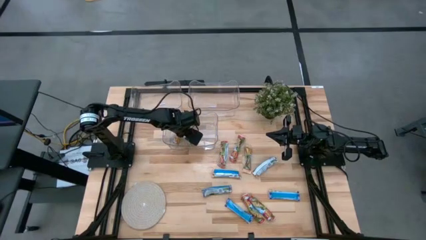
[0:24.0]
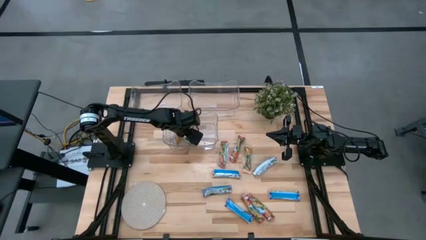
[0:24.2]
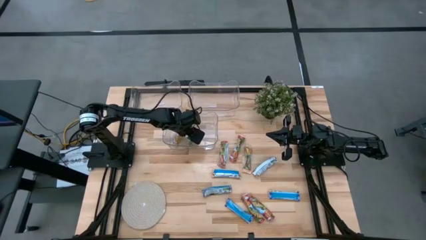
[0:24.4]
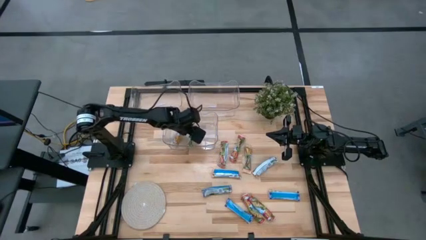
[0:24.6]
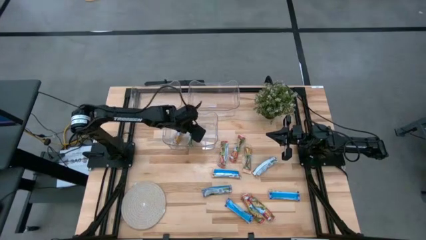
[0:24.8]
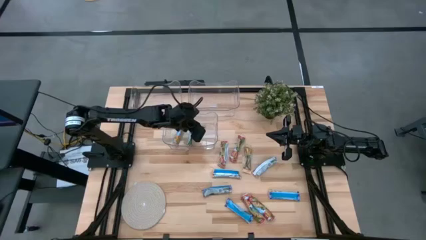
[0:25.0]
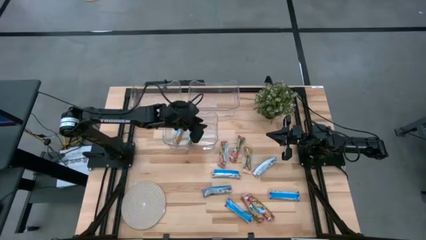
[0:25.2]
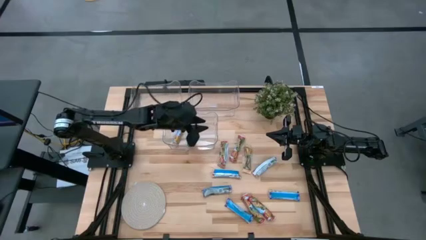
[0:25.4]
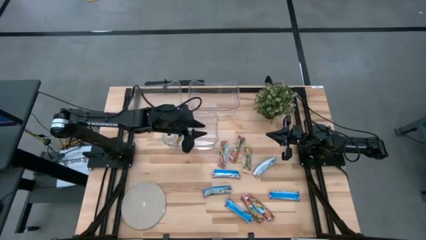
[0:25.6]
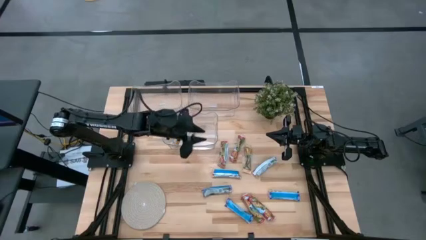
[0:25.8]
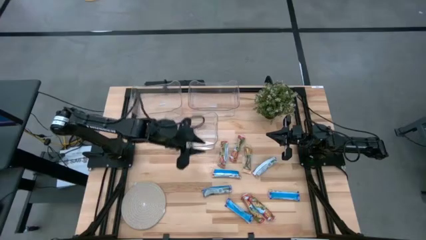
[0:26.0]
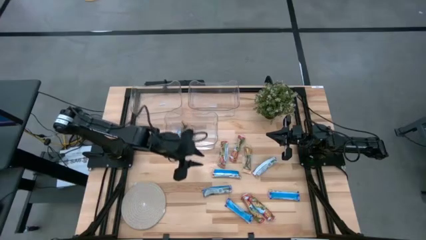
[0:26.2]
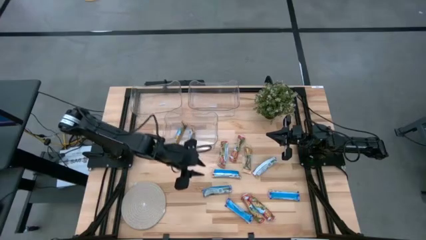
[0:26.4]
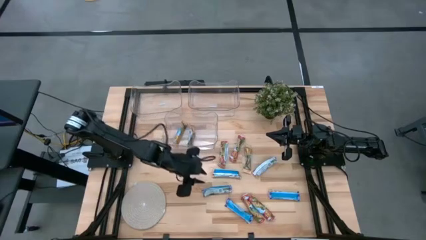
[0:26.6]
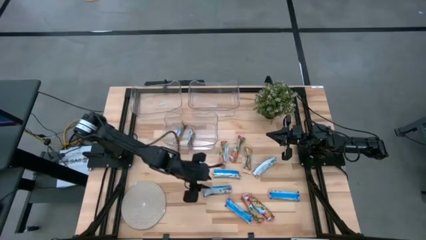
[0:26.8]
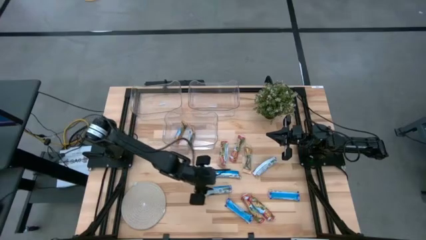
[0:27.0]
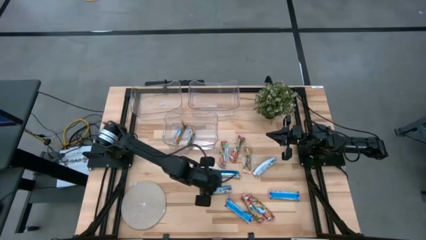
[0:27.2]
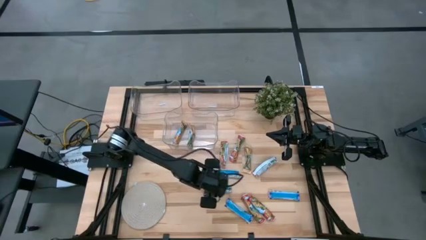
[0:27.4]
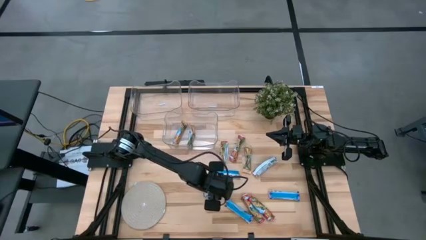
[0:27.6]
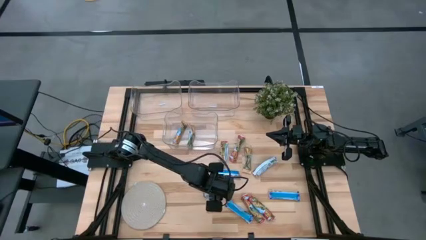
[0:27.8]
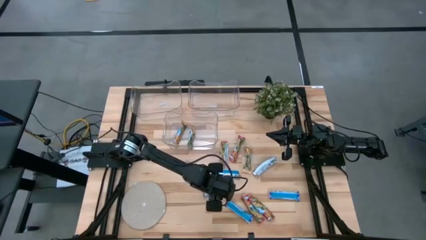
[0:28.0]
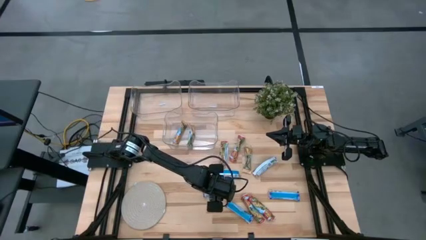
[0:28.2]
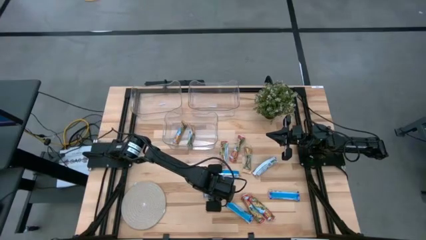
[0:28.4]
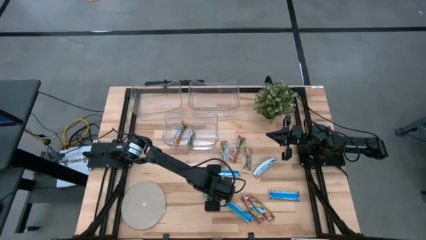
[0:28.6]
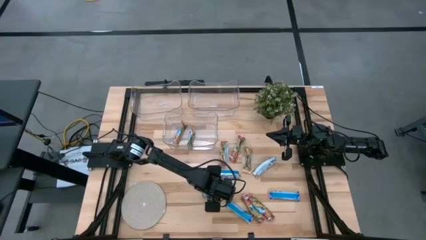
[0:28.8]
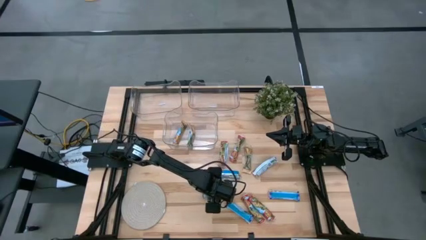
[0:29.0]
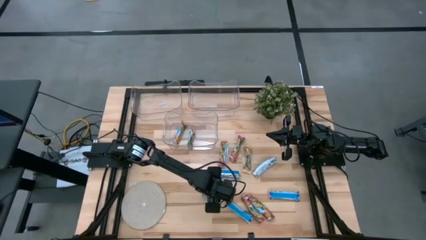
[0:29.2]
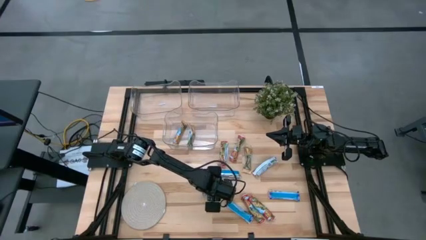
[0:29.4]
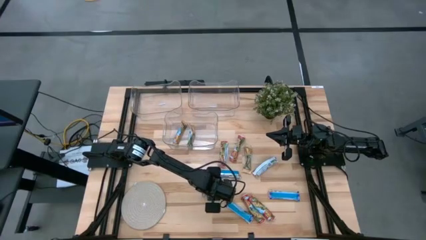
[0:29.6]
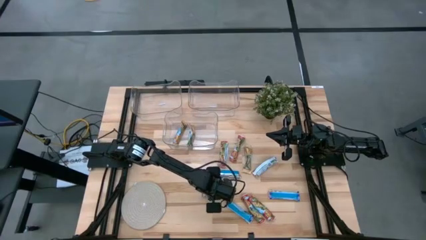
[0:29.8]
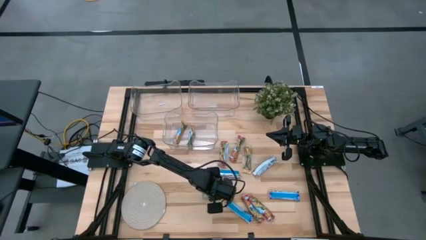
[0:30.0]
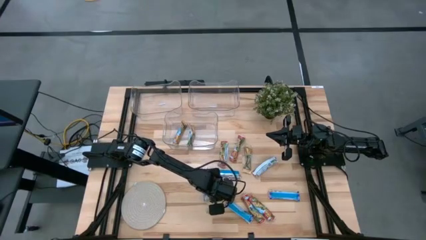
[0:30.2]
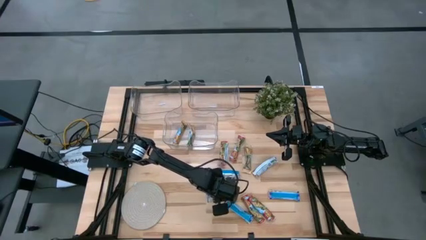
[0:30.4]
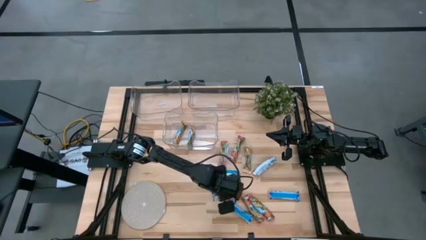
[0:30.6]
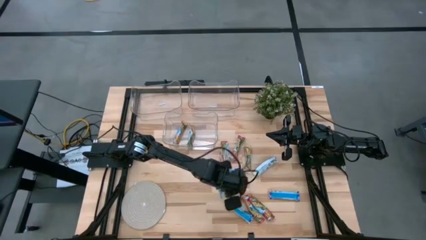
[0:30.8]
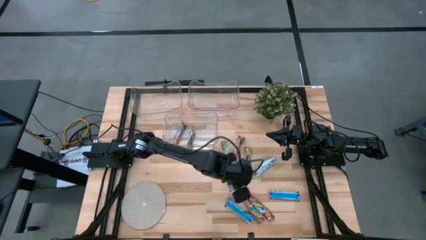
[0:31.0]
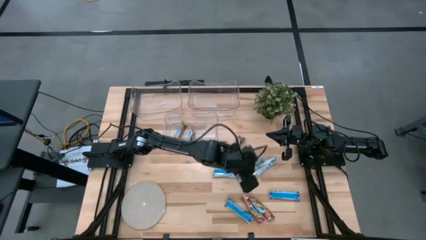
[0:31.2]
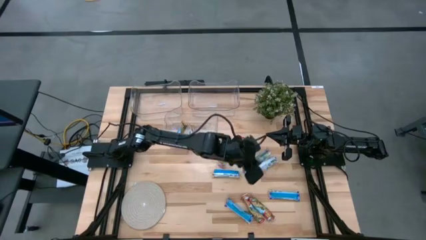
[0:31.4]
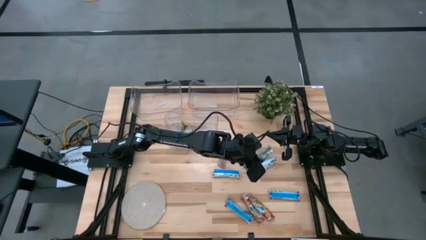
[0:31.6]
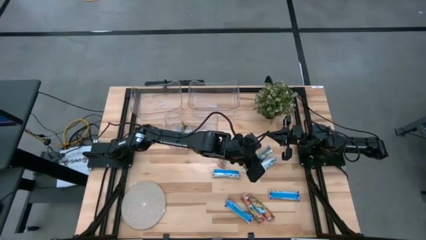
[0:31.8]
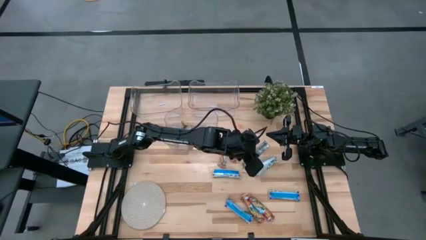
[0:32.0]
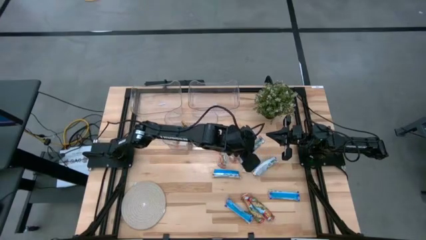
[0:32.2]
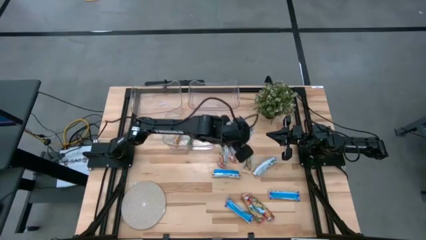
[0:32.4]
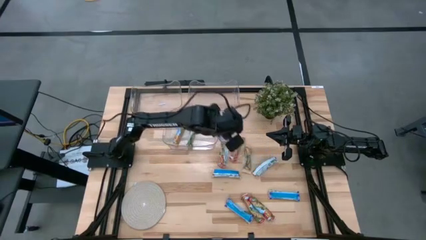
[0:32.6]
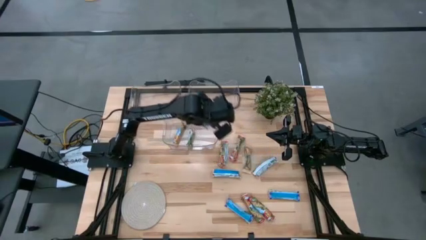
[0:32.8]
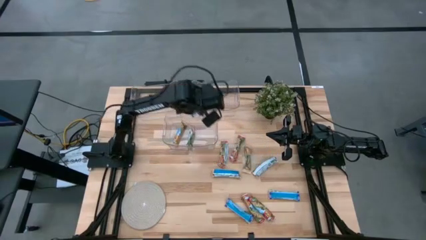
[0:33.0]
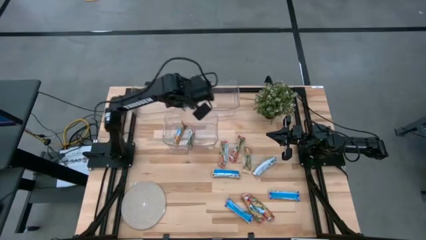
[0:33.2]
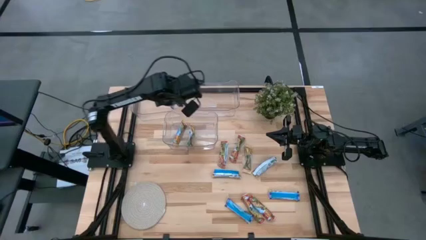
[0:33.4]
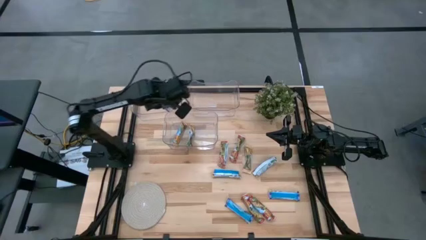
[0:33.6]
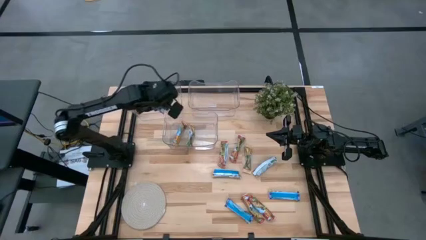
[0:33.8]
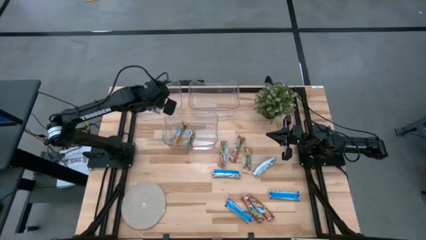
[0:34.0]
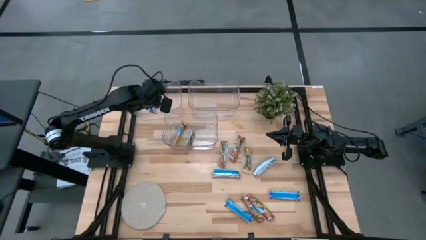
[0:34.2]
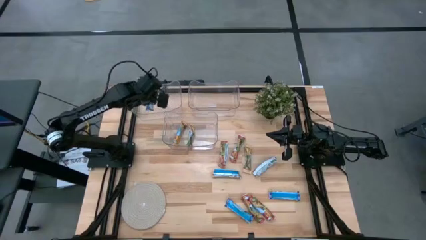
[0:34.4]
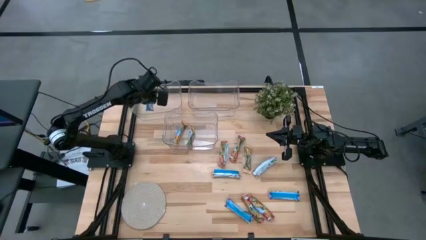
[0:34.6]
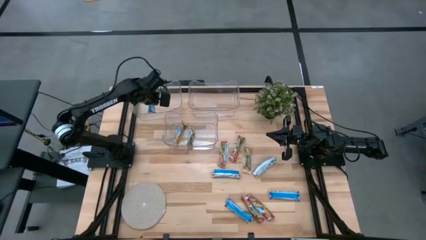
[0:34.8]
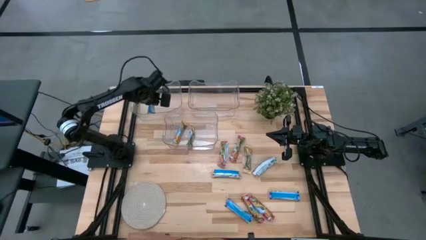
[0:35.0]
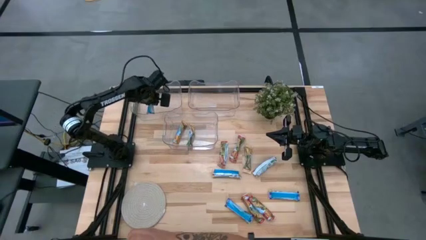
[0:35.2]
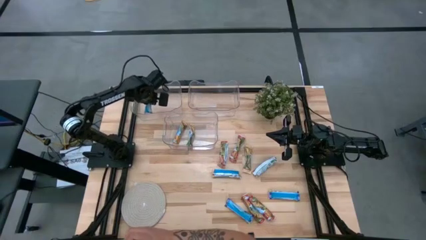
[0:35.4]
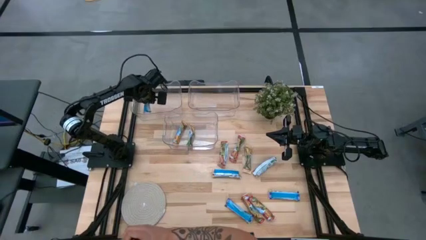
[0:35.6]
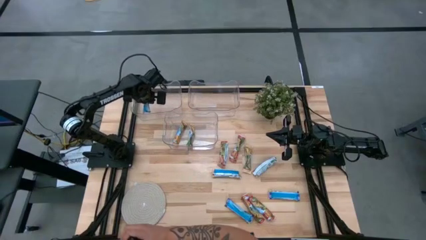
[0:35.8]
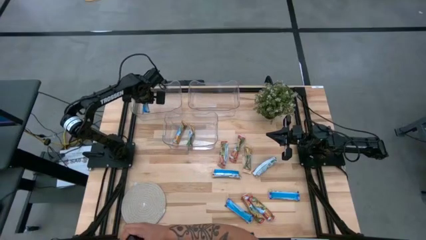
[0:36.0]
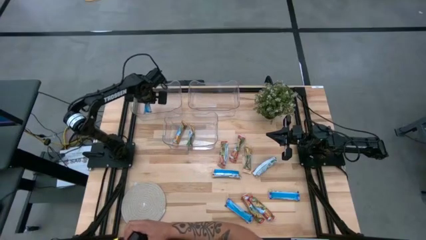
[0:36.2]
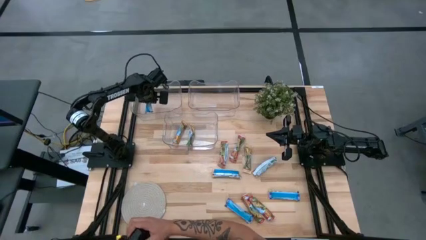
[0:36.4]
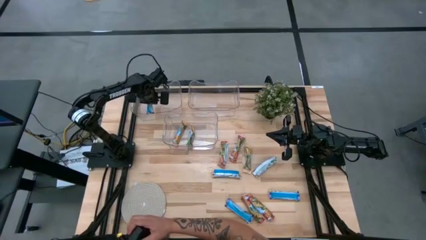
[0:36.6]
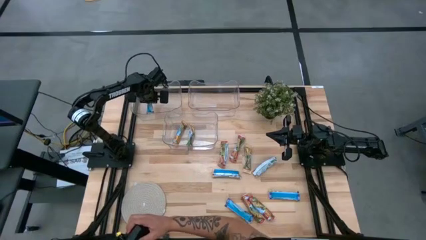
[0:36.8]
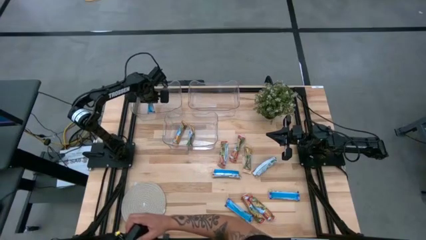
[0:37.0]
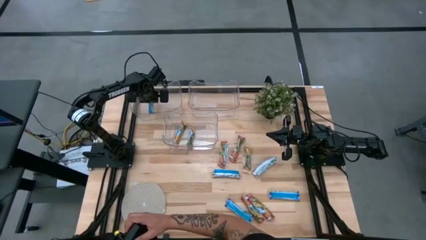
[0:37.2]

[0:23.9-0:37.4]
Task: Pick and place Granola Bars by type
Put the blue granola bar into the top left transparent bin
